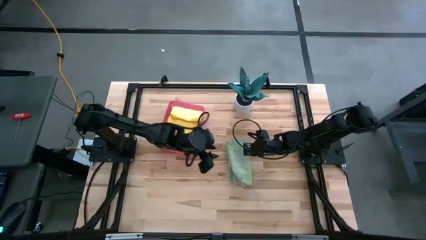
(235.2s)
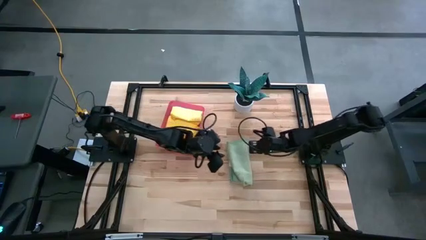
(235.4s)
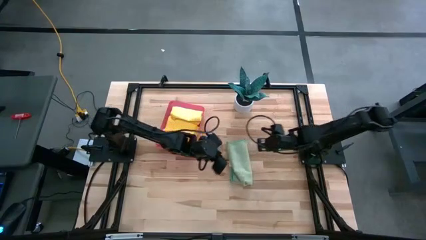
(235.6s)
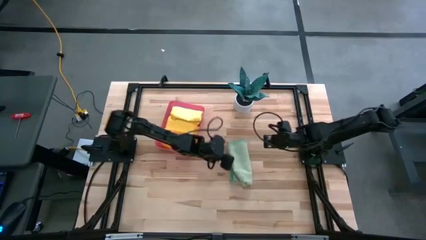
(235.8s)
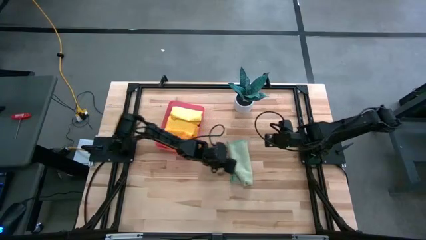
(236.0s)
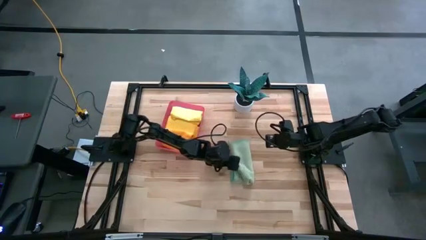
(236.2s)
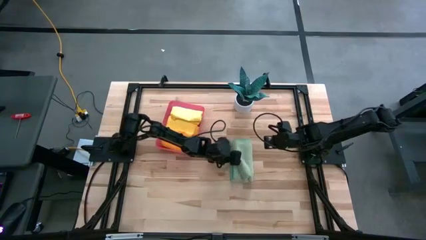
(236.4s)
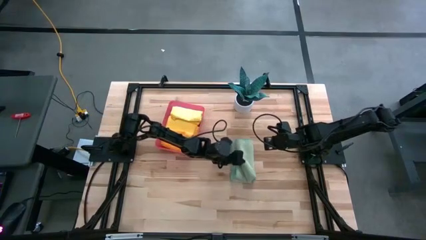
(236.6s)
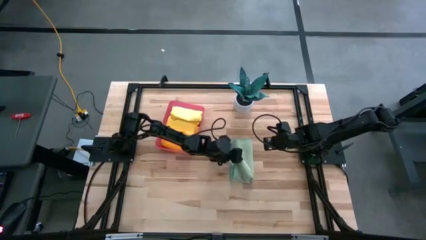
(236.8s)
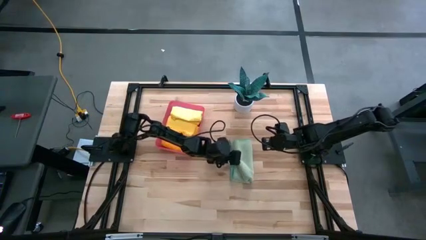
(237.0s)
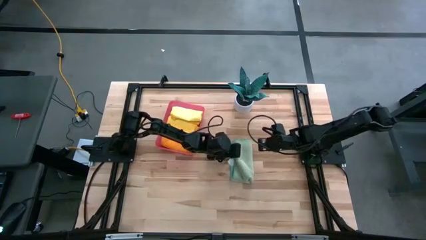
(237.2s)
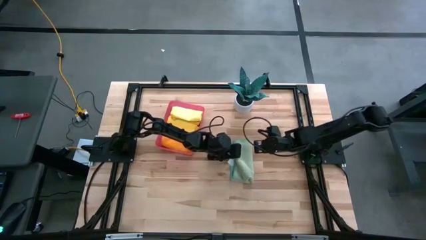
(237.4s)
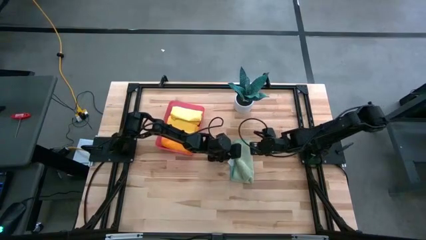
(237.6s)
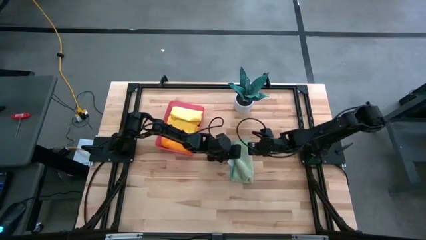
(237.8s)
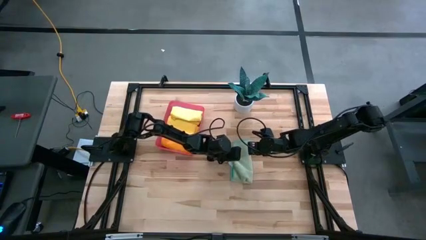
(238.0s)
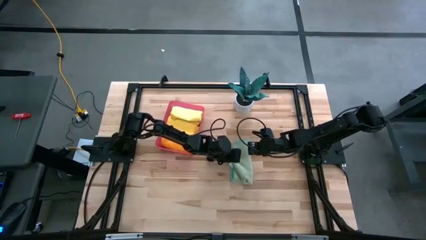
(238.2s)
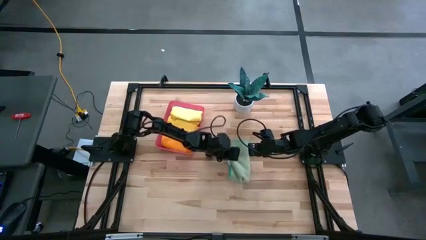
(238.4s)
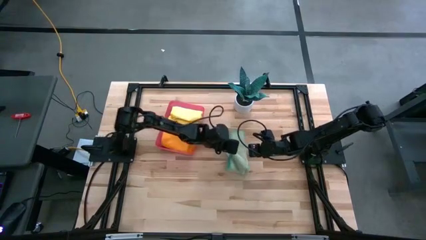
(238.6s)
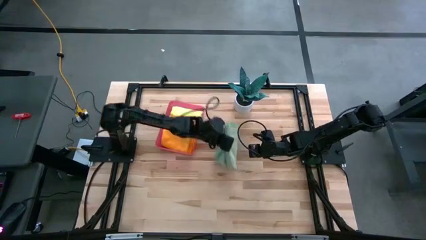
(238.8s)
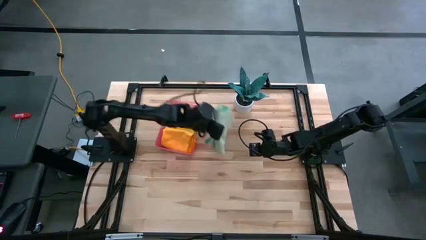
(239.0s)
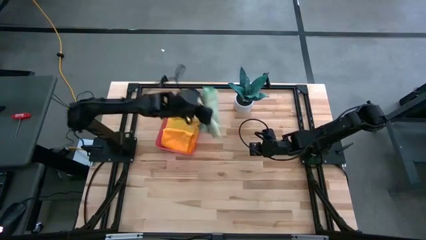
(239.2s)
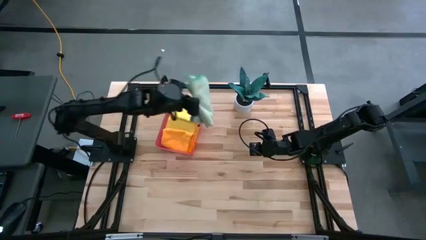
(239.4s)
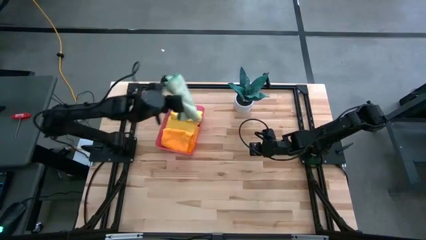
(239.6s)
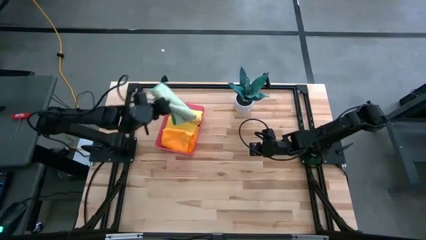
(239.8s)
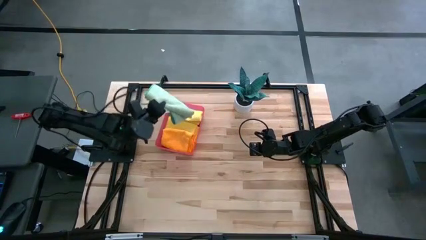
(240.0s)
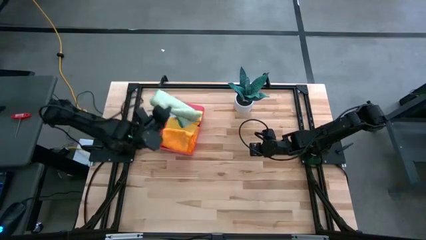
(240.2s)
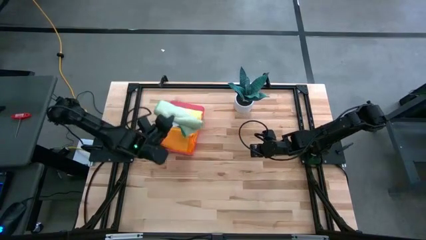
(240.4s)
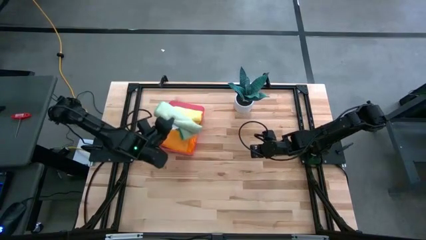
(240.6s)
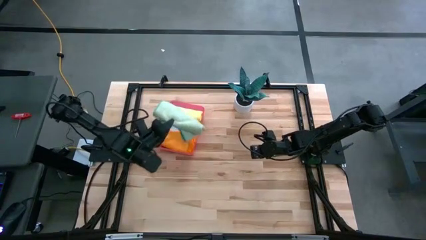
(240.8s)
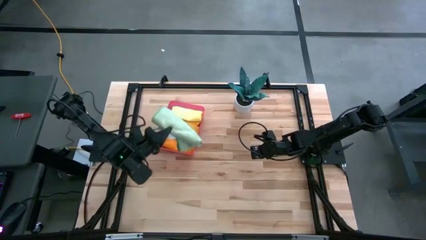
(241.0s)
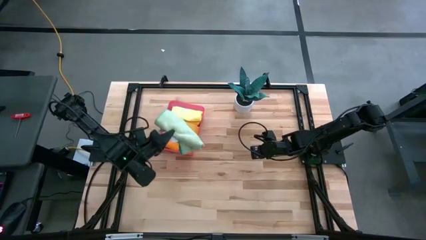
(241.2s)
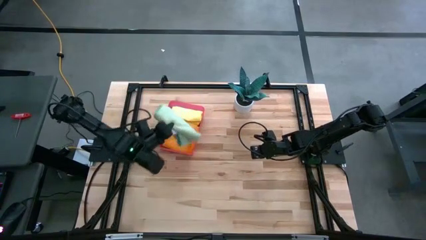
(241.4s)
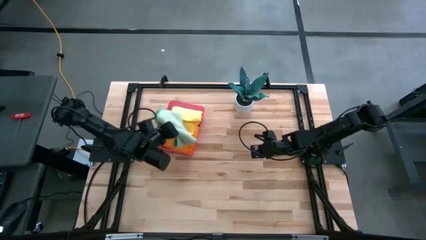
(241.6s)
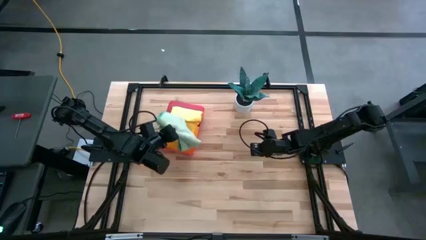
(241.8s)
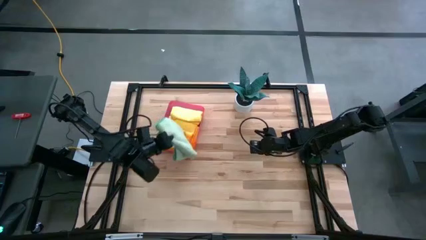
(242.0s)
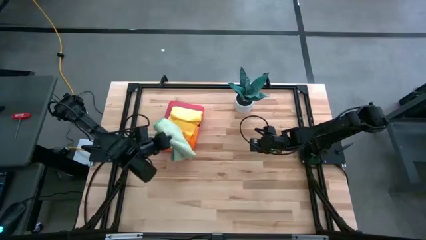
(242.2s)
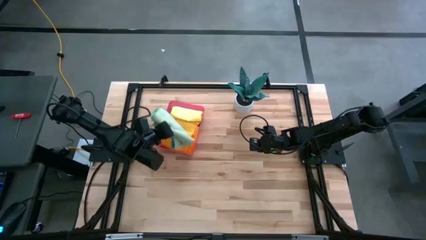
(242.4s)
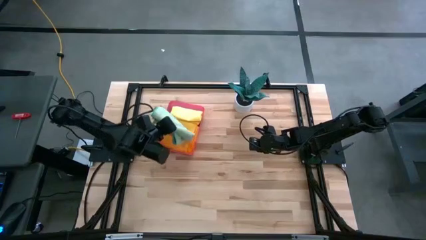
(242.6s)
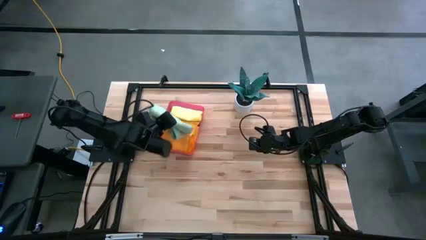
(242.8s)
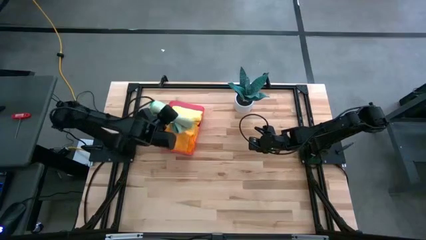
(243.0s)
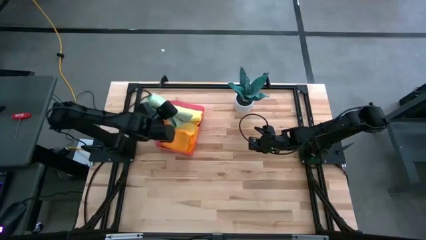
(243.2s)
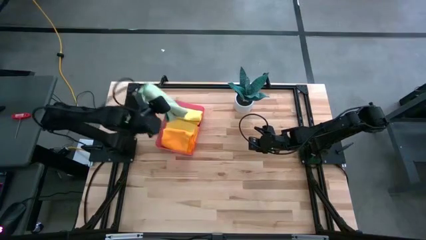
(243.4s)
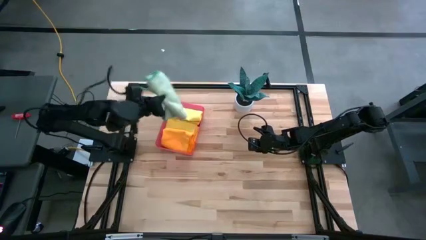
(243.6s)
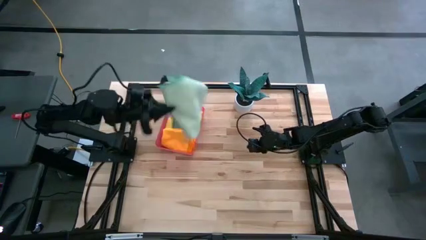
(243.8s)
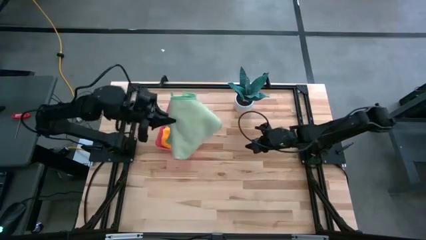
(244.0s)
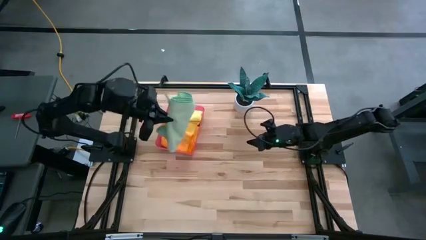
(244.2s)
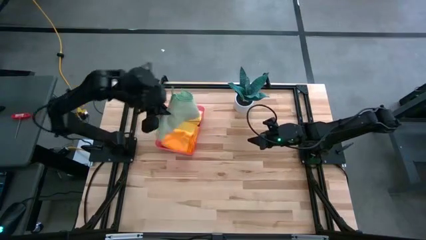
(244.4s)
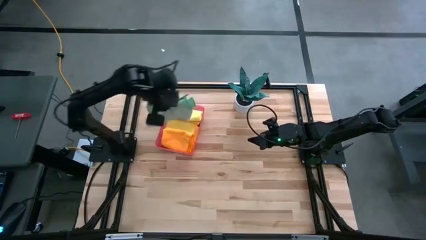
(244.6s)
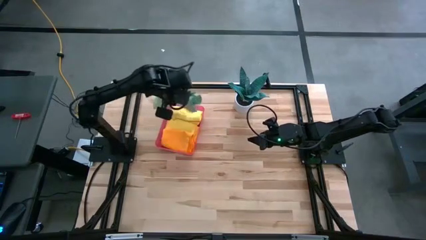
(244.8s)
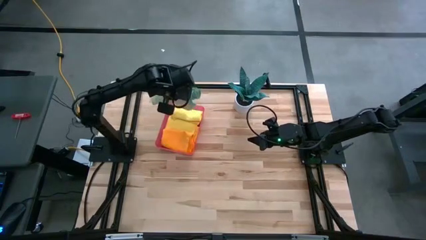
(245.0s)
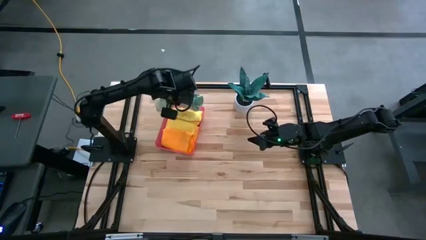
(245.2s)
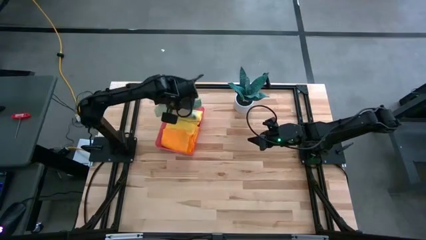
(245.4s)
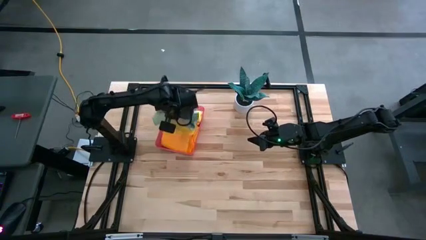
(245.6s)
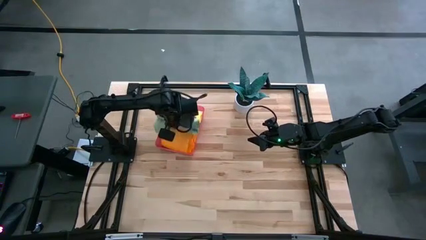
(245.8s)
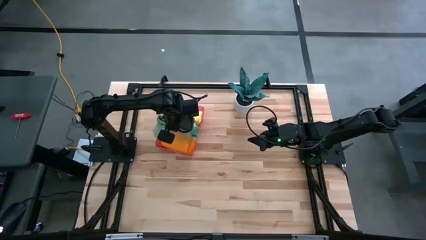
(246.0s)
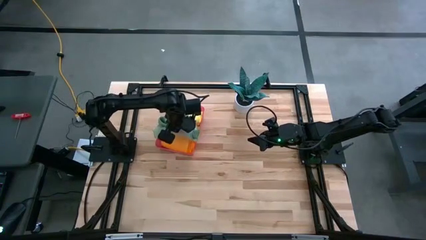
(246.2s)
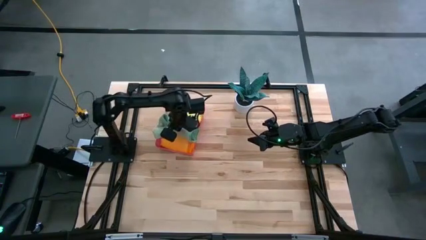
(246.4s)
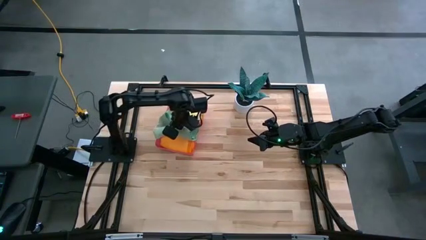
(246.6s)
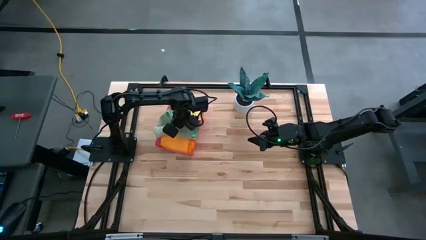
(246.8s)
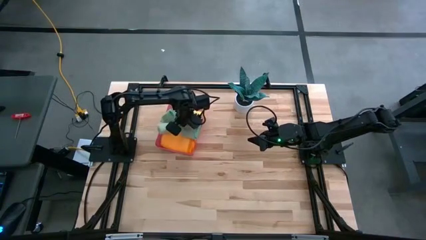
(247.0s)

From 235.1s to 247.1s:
Task: Fold microfiber towels
Put the green microfiber cloth into the pink bin

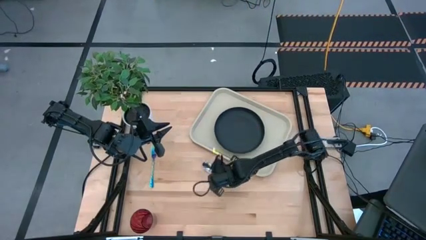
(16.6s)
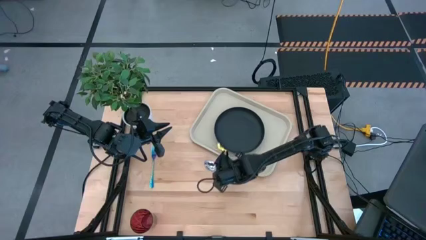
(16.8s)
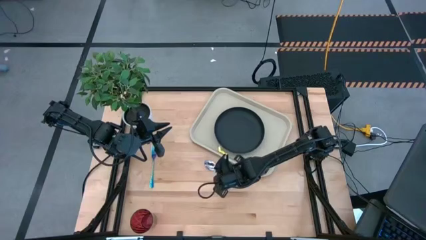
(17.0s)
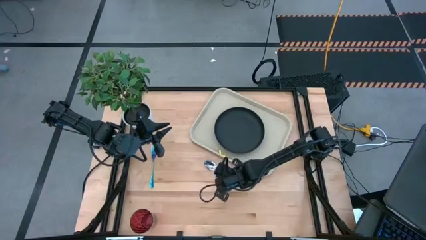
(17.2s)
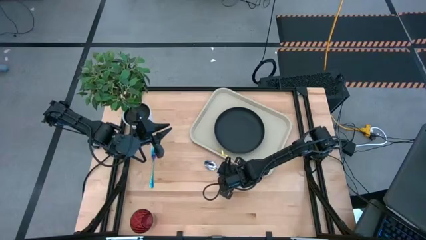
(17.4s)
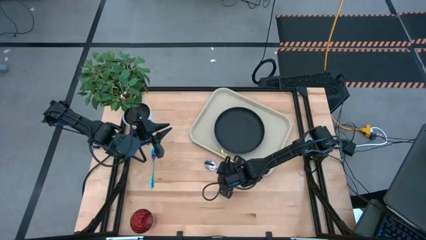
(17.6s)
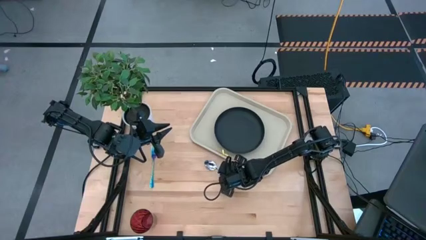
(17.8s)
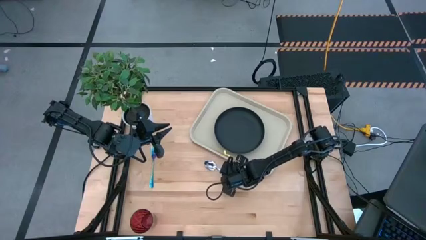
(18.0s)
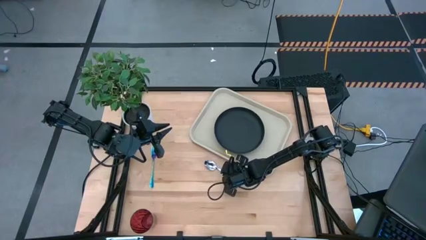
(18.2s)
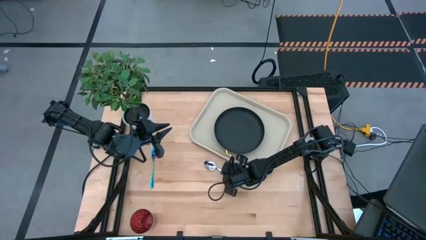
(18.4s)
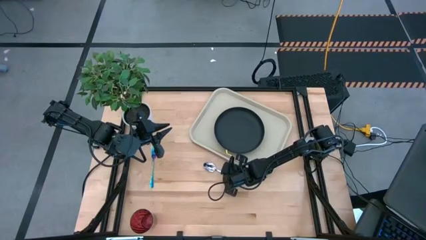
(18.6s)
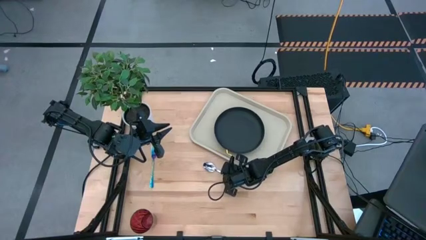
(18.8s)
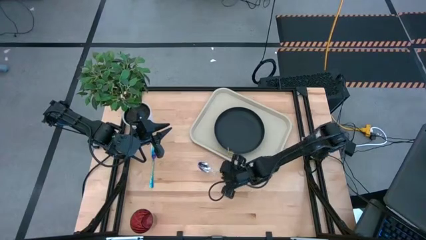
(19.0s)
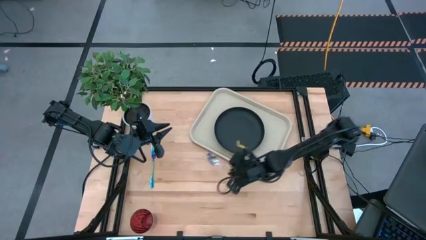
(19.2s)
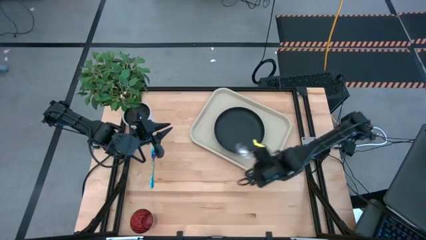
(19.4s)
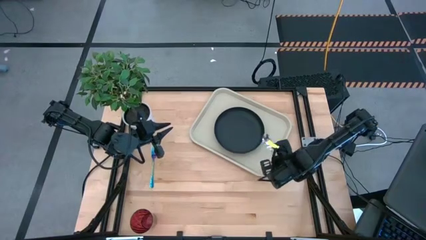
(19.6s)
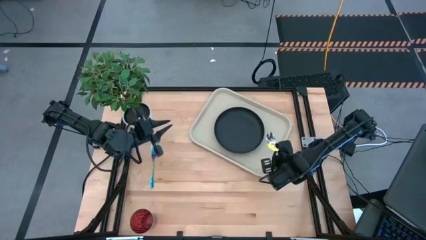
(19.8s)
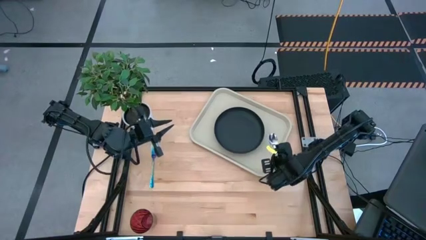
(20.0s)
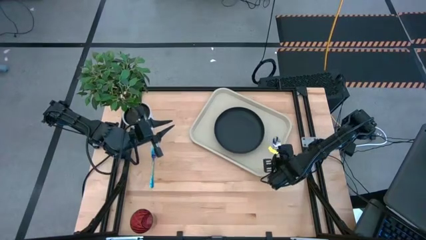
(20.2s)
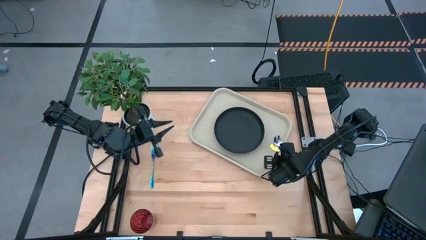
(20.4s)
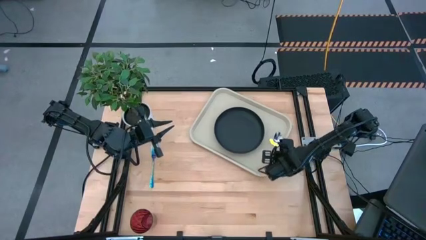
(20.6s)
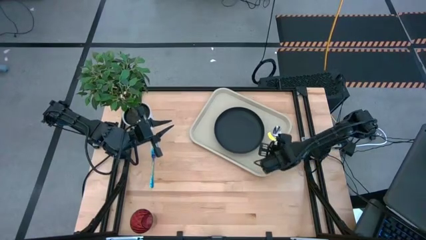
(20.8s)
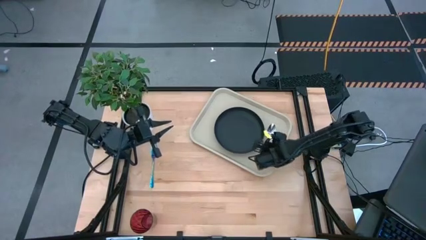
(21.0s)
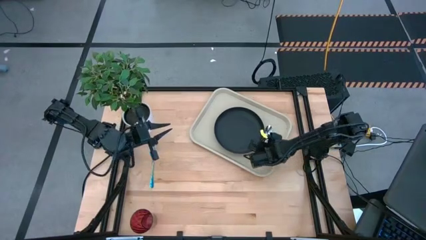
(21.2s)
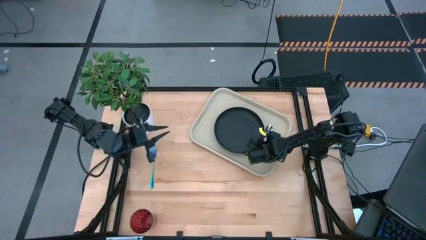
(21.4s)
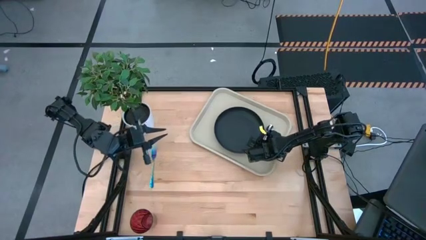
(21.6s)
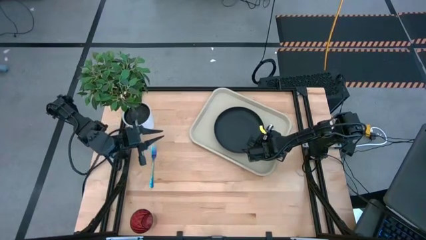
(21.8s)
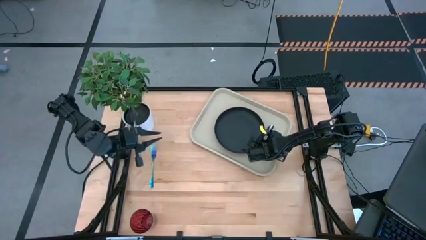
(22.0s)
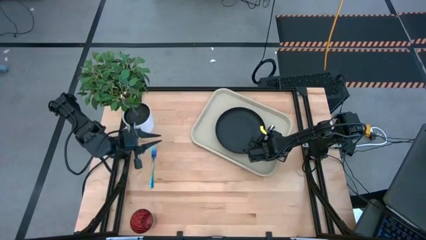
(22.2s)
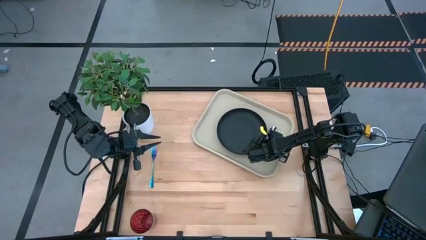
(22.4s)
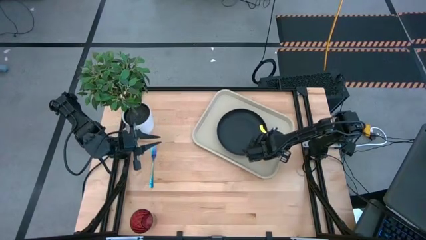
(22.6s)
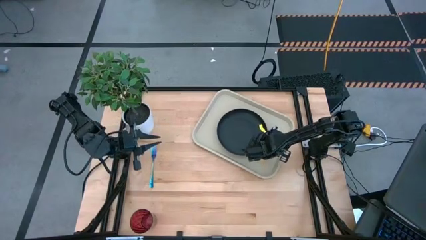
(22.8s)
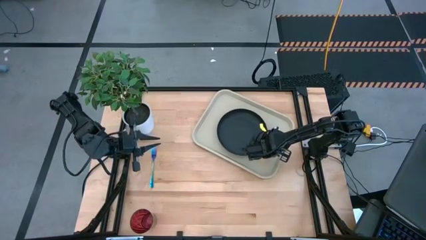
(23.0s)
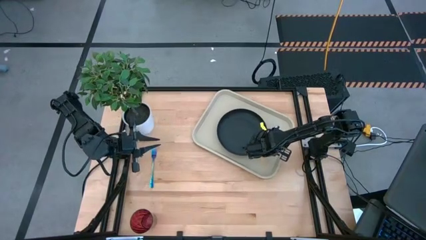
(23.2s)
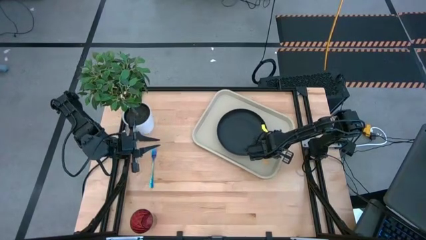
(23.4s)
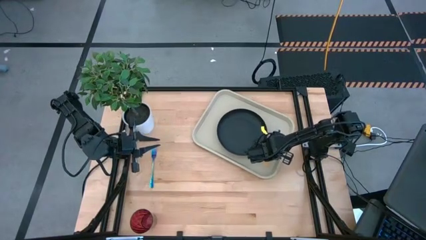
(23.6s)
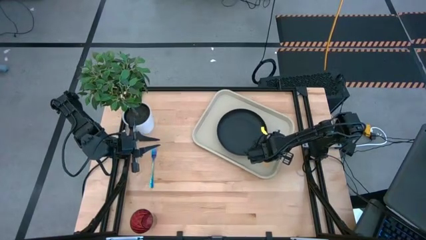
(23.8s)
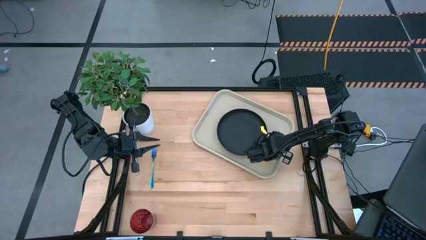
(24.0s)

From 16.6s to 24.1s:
Task: Pick and place plate/cup/fork/spoon on tray
Put the spoon to the right of the black plate on the tray
